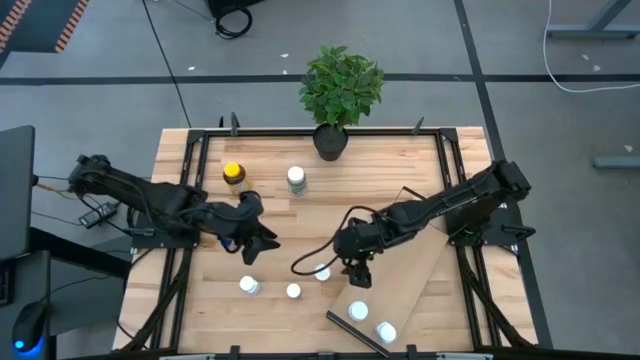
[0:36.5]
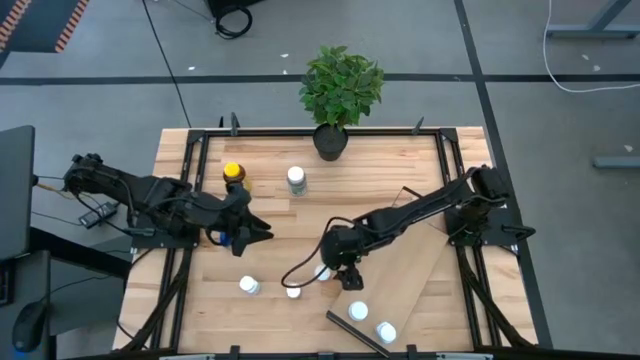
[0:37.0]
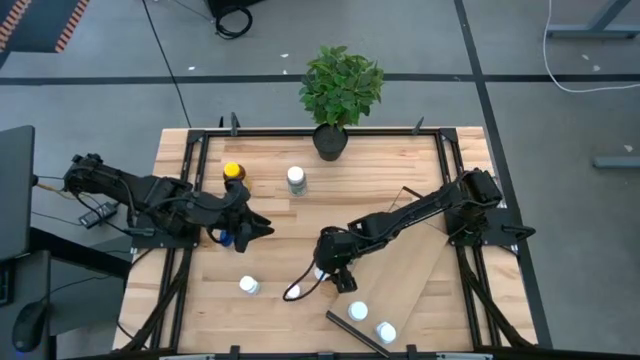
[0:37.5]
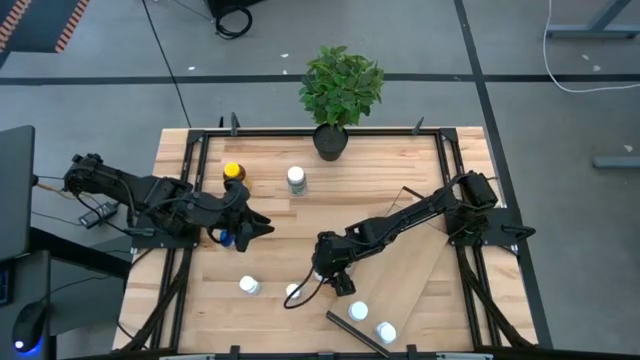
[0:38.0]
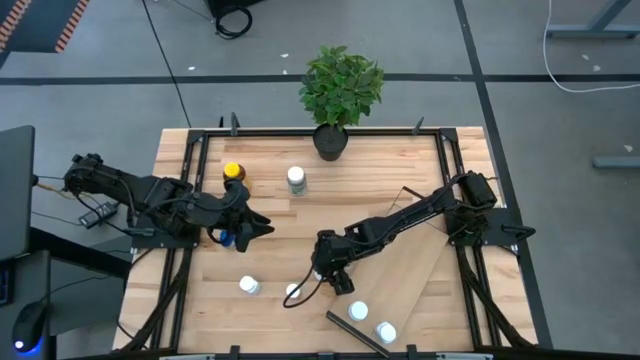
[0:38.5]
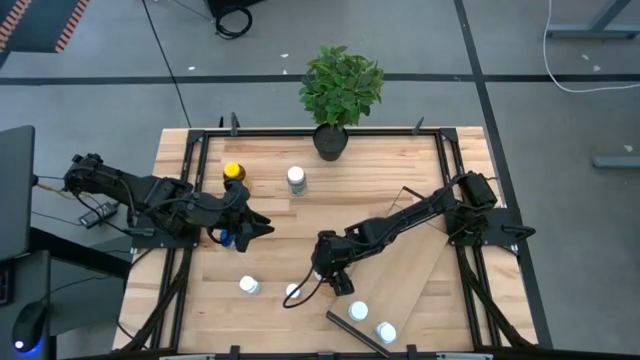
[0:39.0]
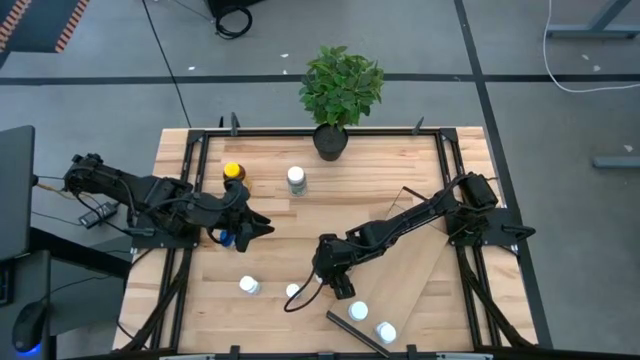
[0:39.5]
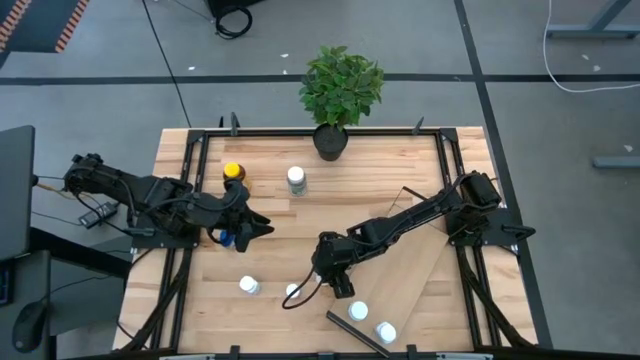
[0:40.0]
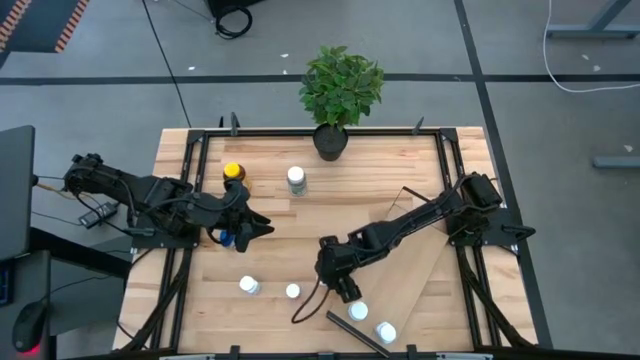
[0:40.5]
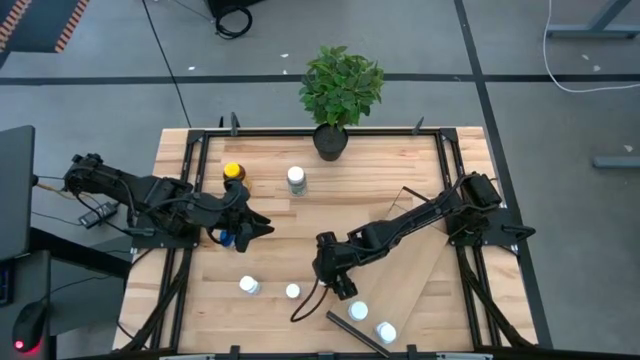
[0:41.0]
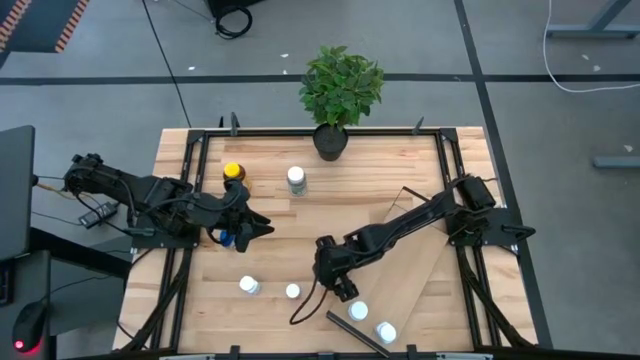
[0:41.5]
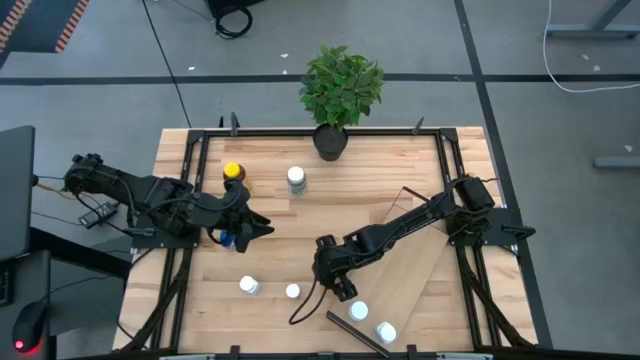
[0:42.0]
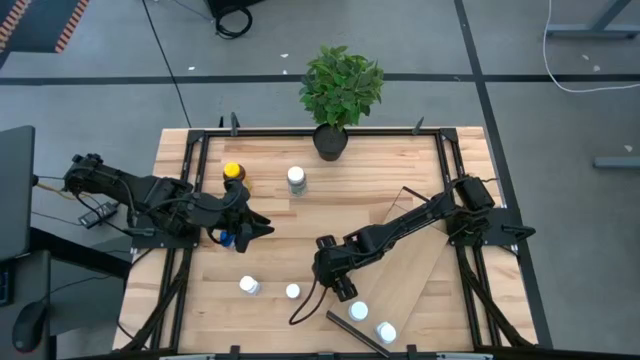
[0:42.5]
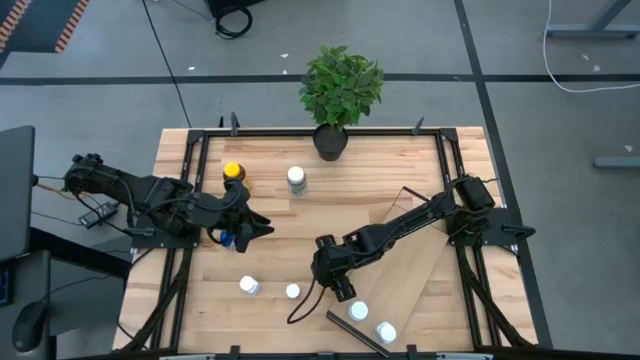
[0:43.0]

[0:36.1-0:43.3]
Task: Pick and place medicine bottles onto shelf by color
Put the orange medicine bottle on the shelf

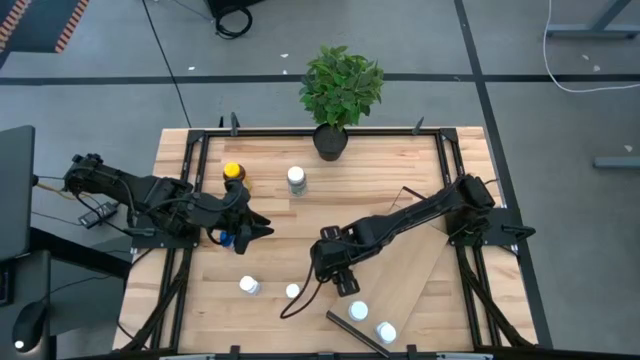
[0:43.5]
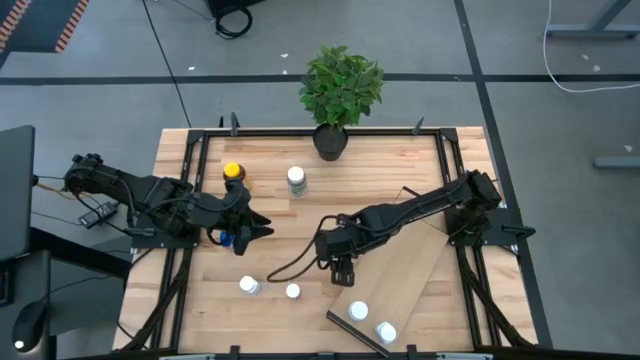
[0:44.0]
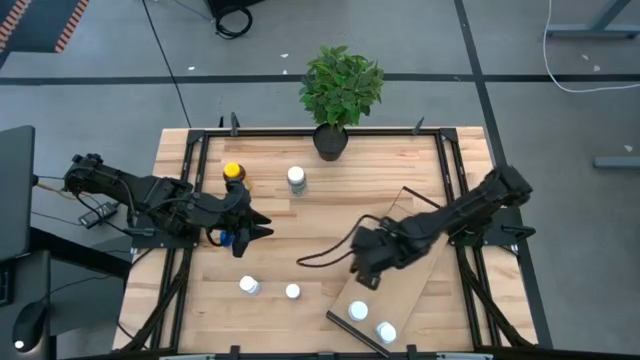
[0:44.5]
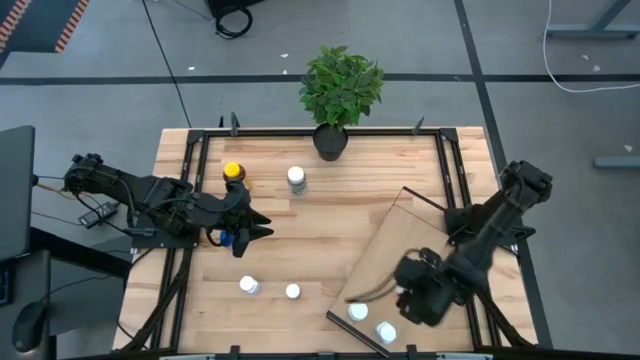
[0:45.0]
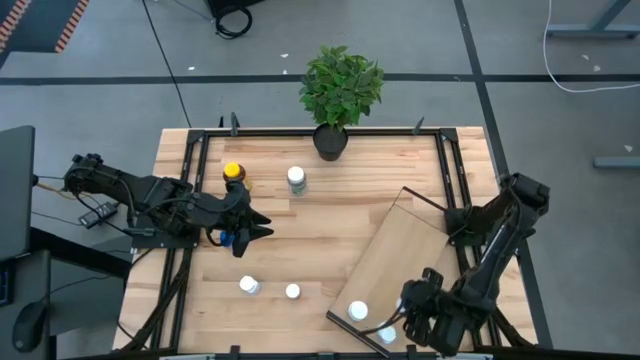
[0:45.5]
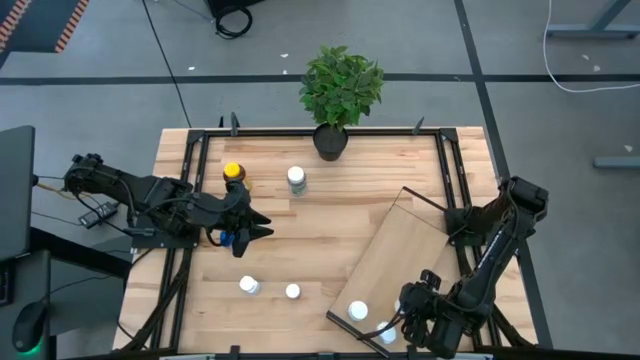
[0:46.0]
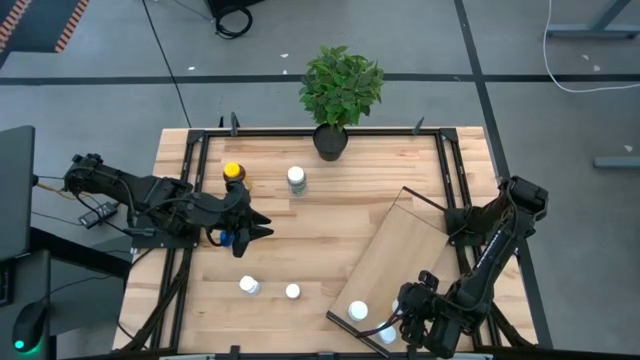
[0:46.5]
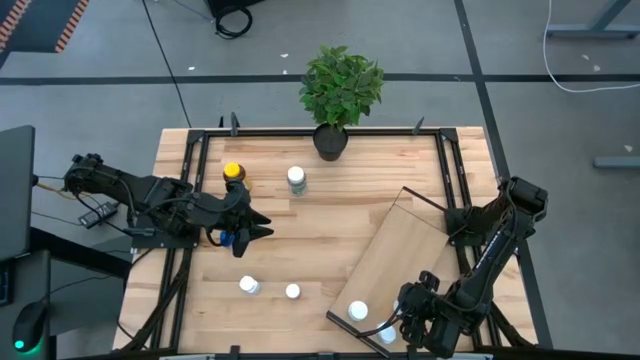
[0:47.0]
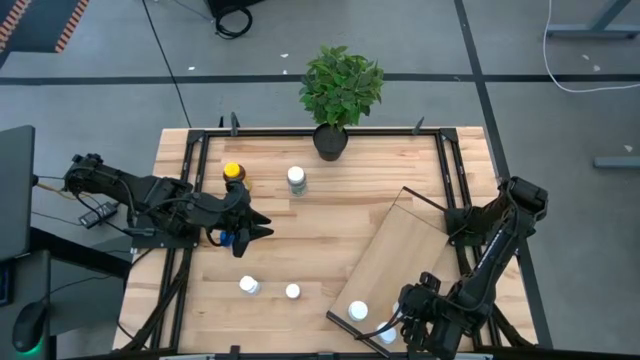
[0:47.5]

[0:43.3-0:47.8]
Put the orange pill bottle on the shelf

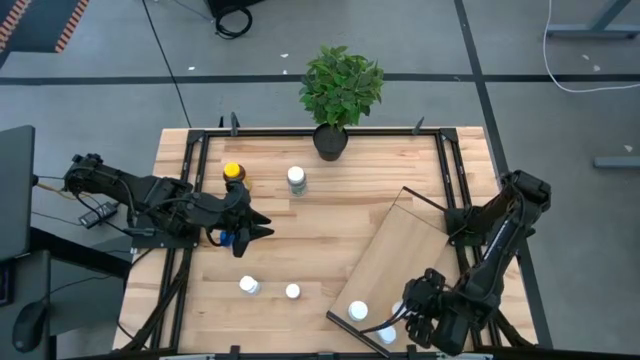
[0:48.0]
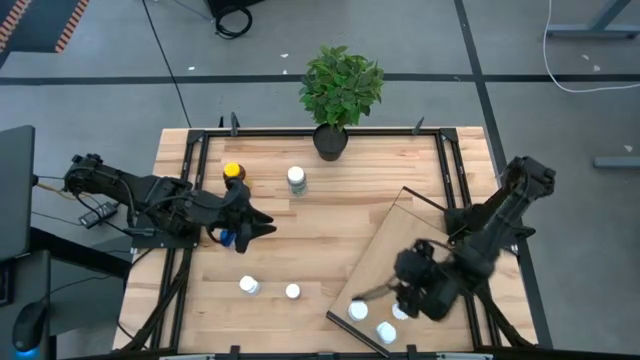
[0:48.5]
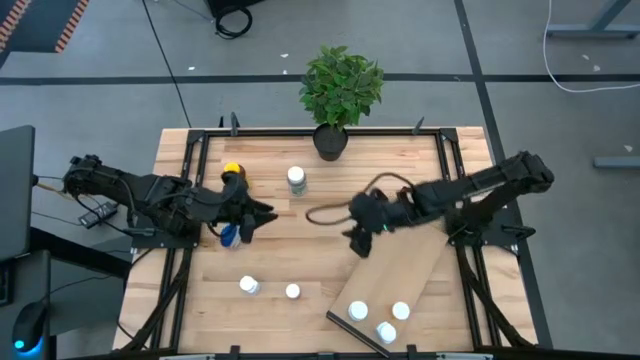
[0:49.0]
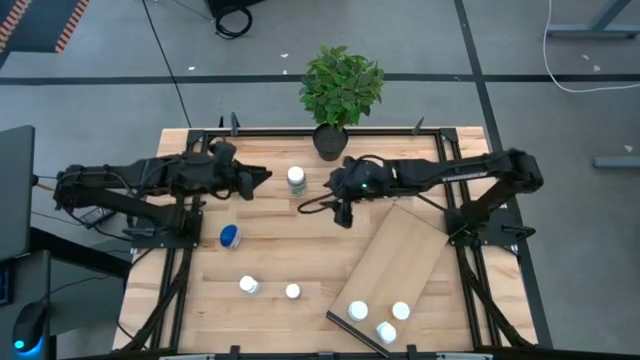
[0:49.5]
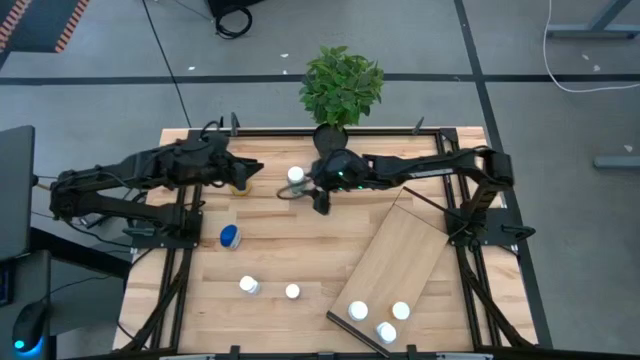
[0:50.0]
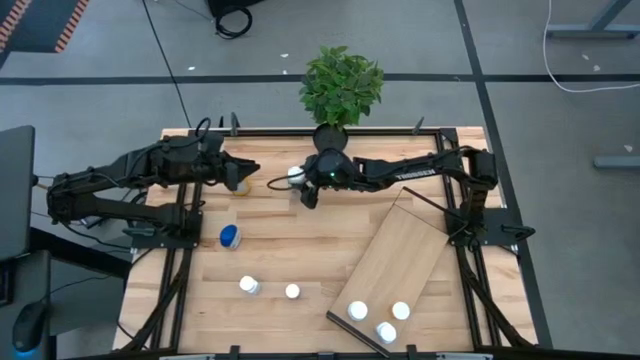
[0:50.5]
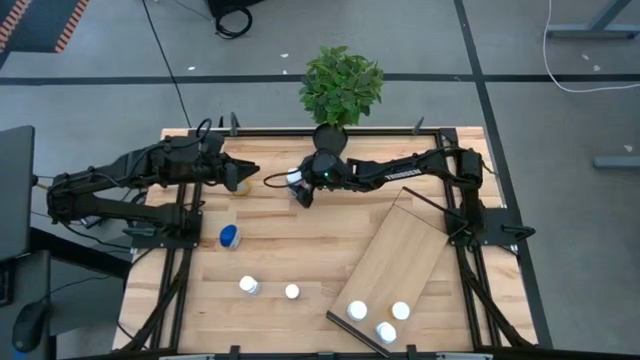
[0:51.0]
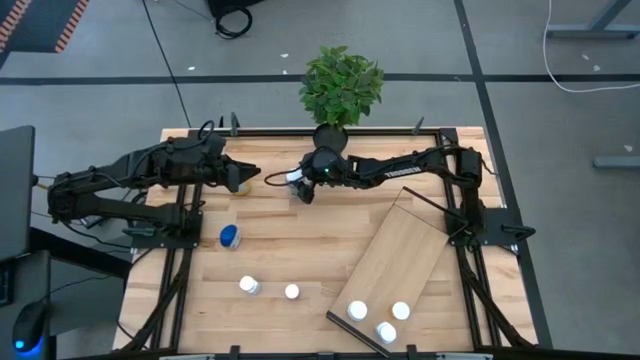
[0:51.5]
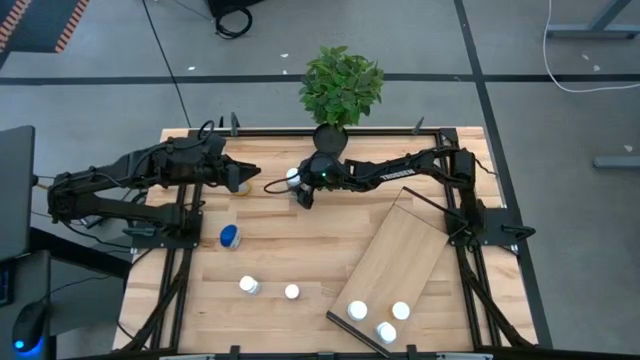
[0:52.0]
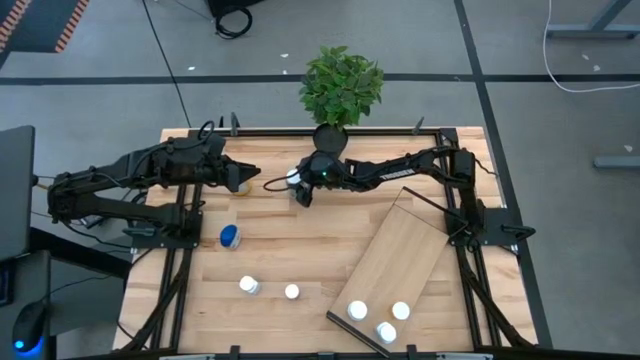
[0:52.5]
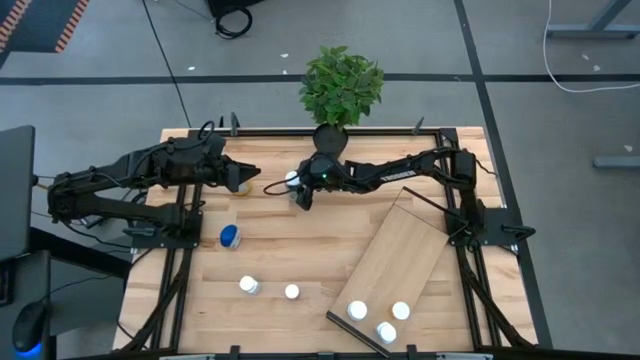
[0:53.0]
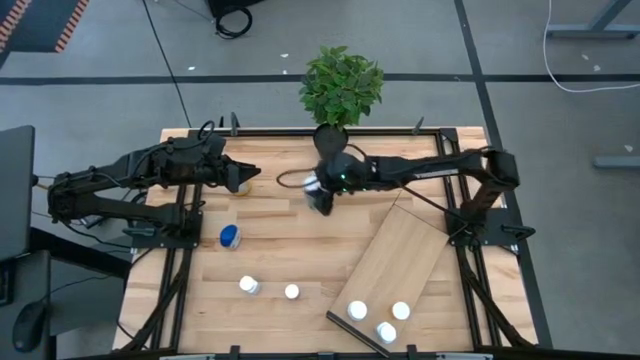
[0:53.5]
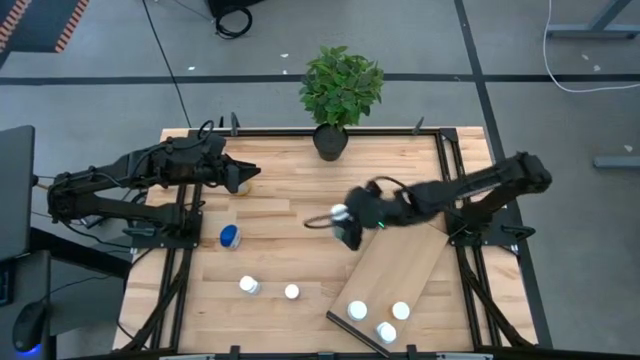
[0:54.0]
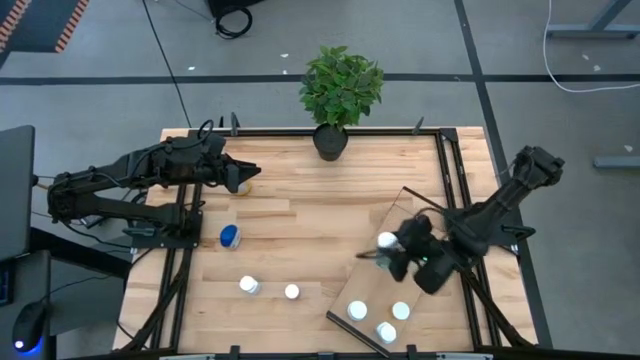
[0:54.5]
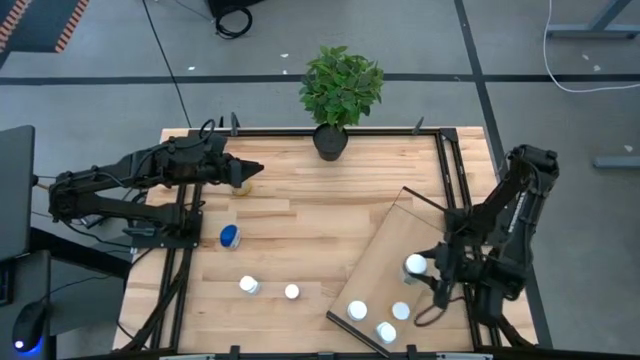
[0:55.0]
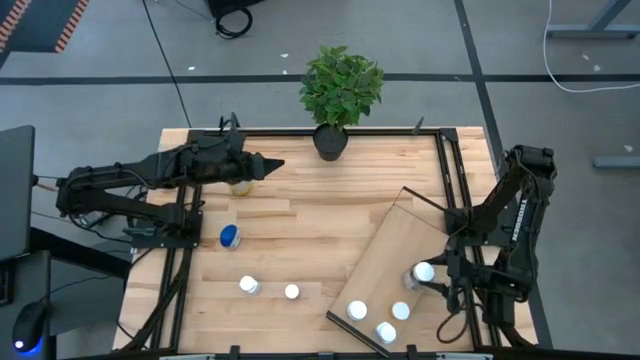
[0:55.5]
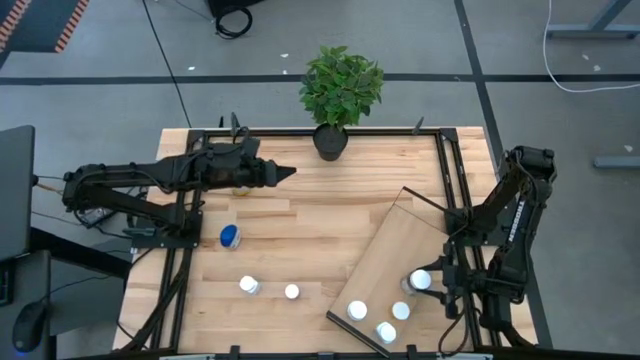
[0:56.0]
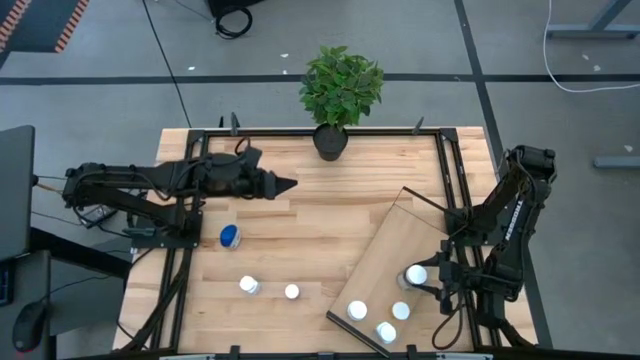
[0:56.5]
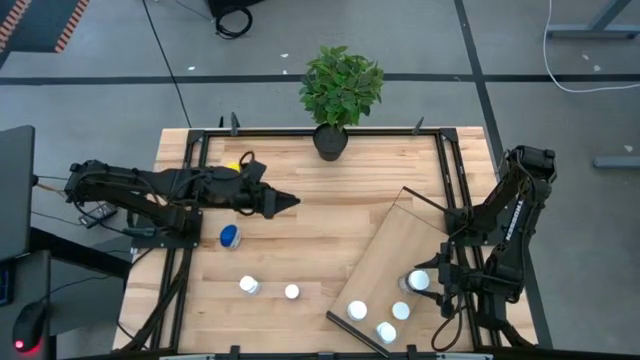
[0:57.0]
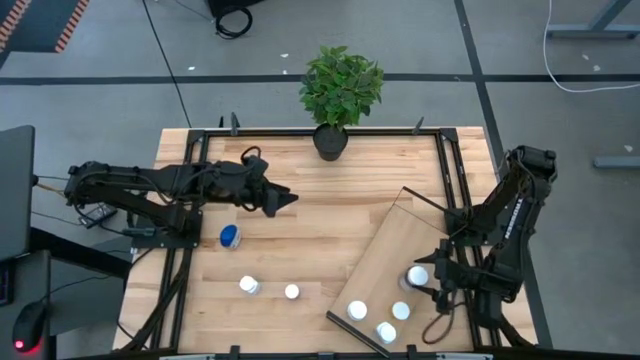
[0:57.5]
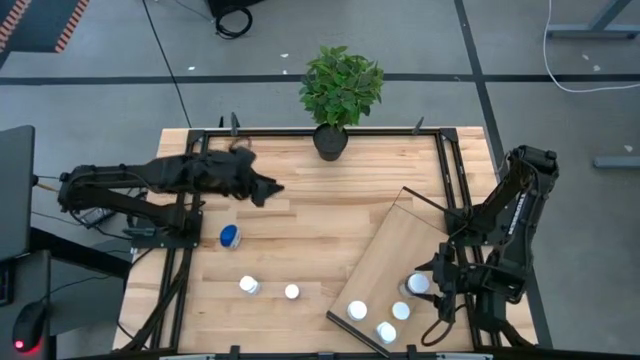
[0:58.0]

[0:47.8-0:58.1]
Put the green medicine bottle on the shelf
